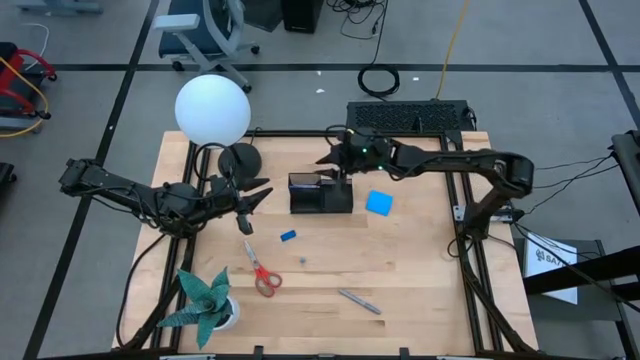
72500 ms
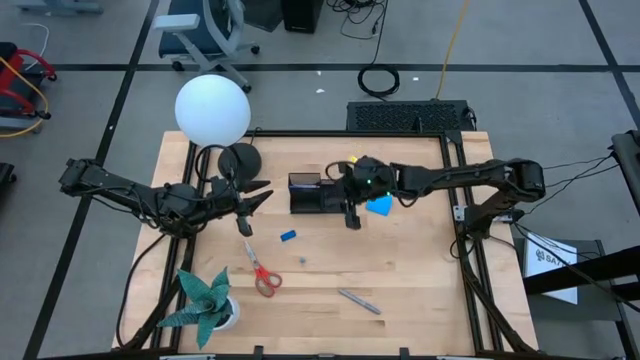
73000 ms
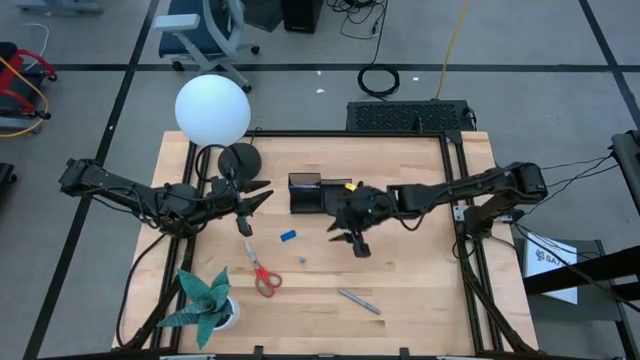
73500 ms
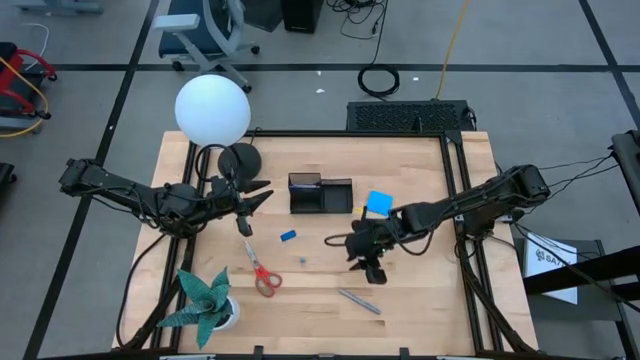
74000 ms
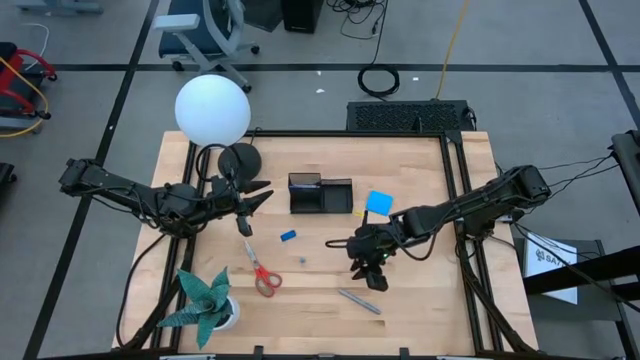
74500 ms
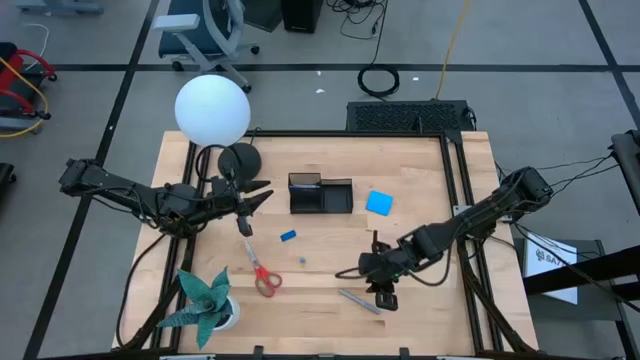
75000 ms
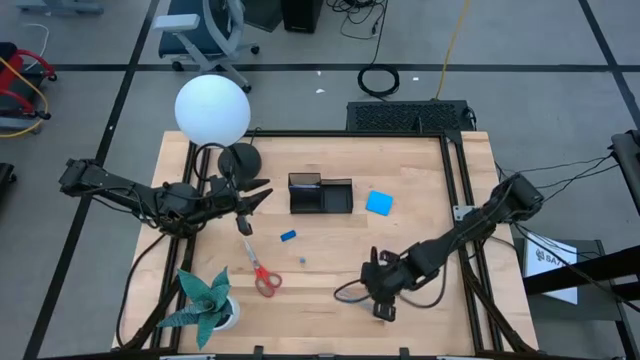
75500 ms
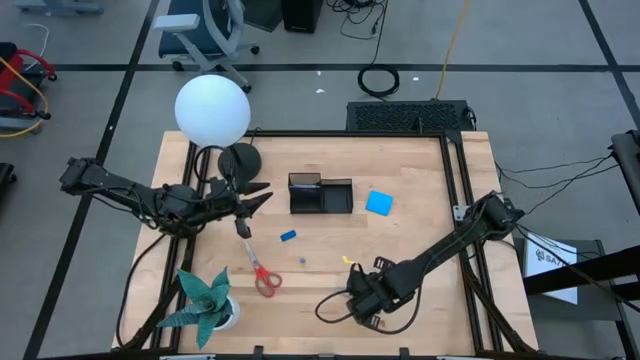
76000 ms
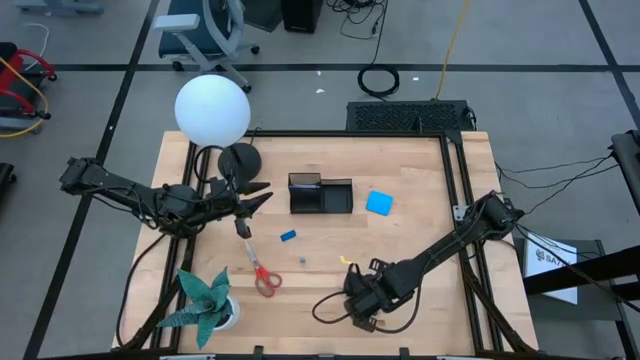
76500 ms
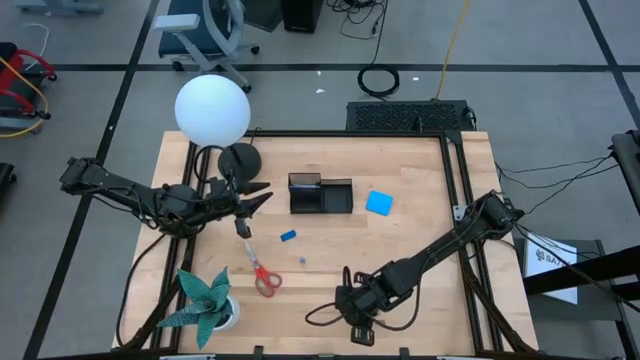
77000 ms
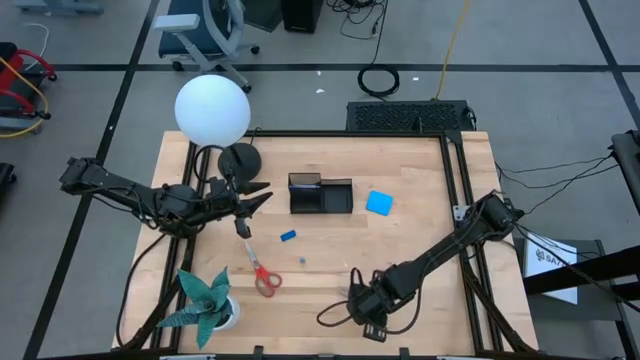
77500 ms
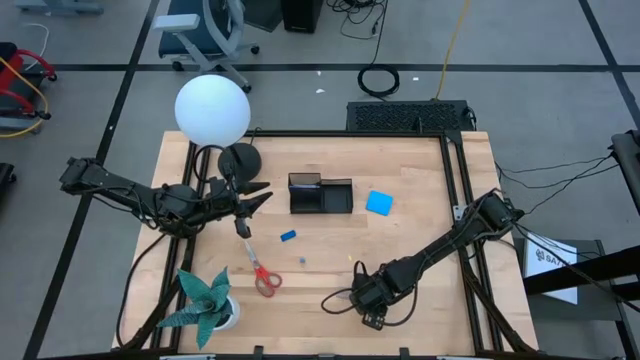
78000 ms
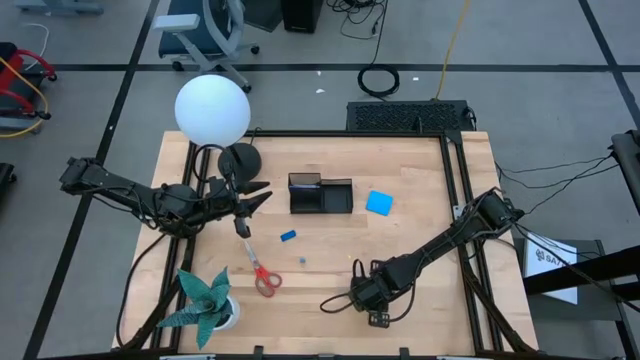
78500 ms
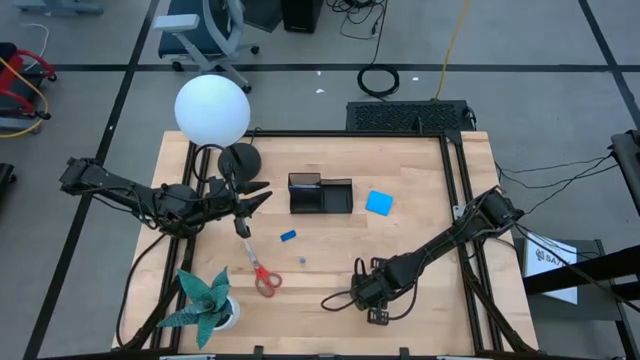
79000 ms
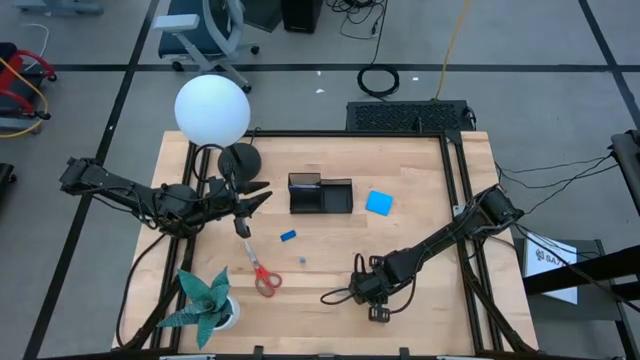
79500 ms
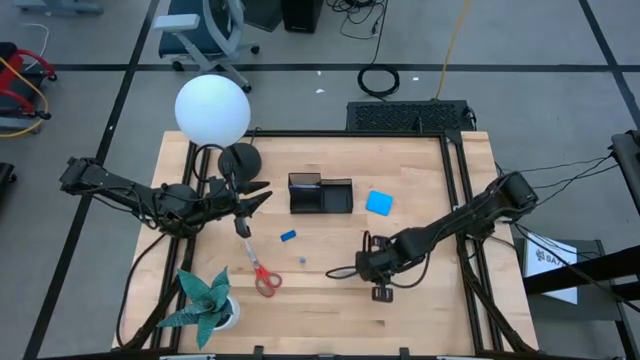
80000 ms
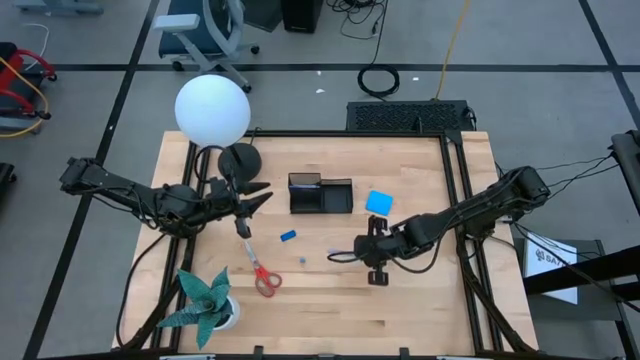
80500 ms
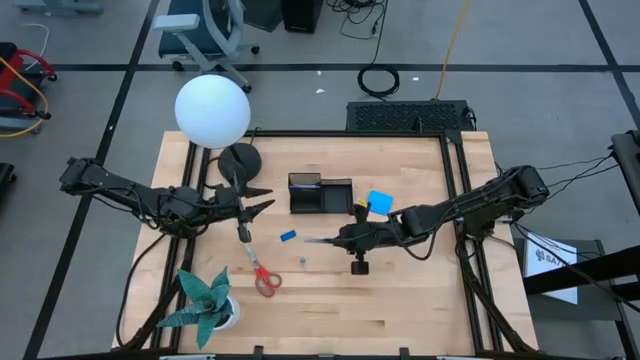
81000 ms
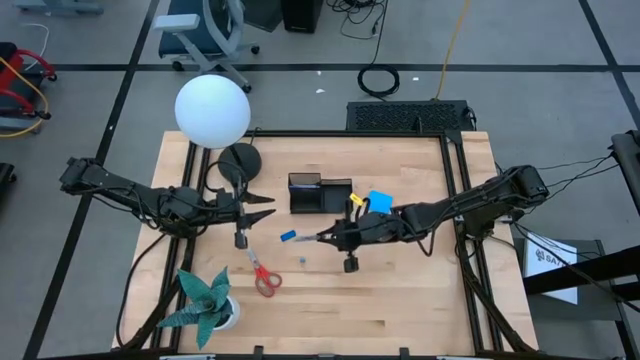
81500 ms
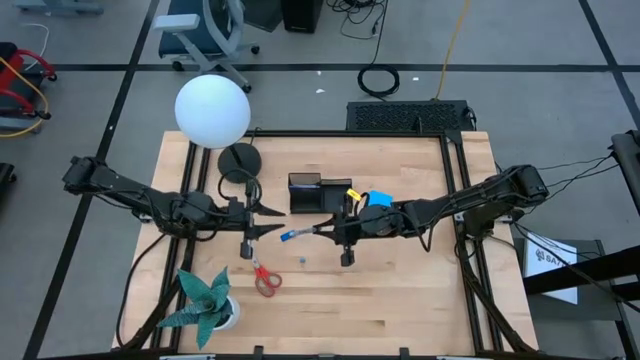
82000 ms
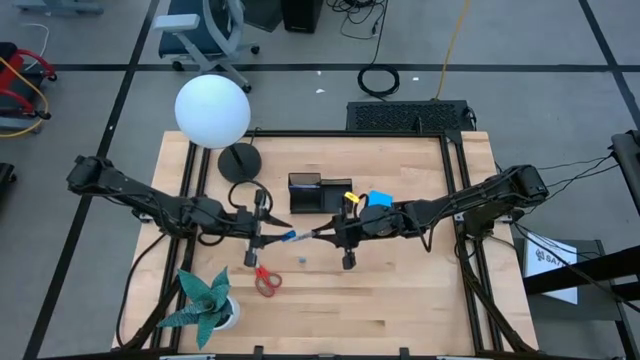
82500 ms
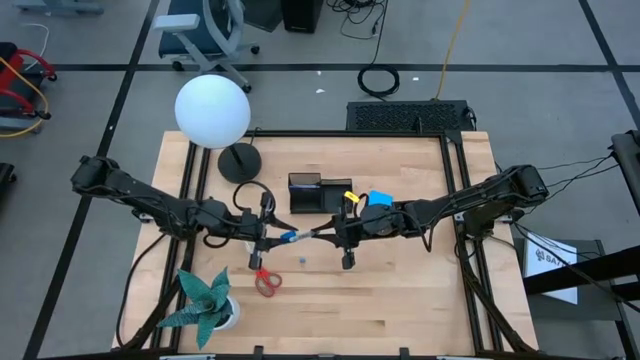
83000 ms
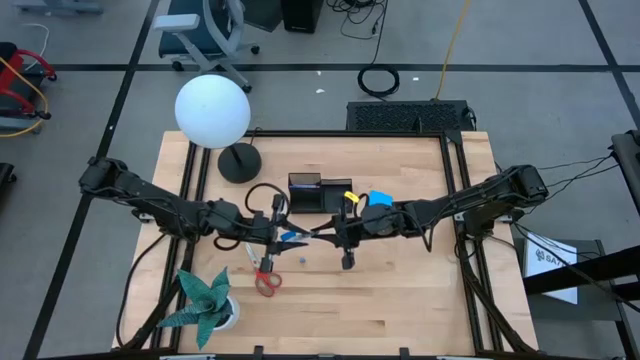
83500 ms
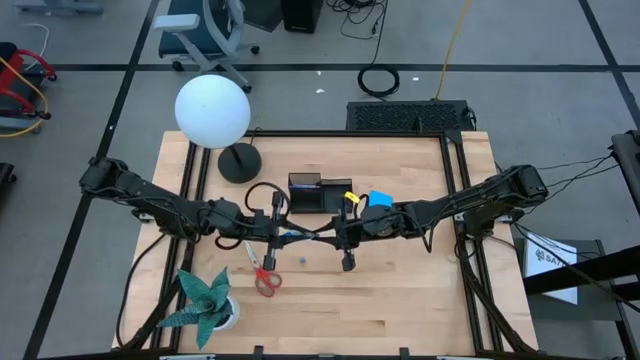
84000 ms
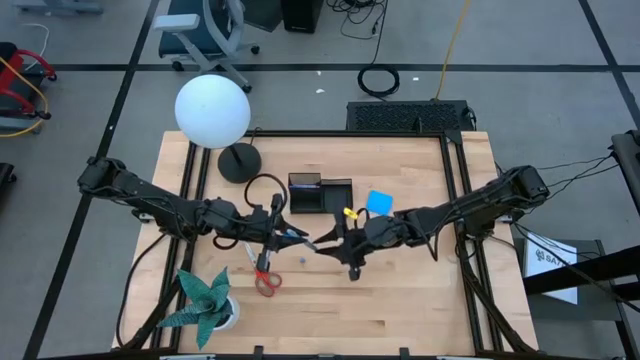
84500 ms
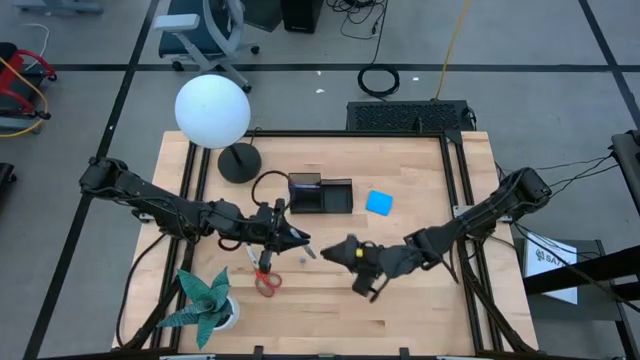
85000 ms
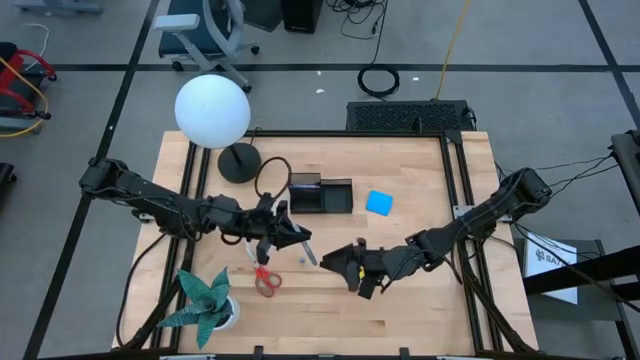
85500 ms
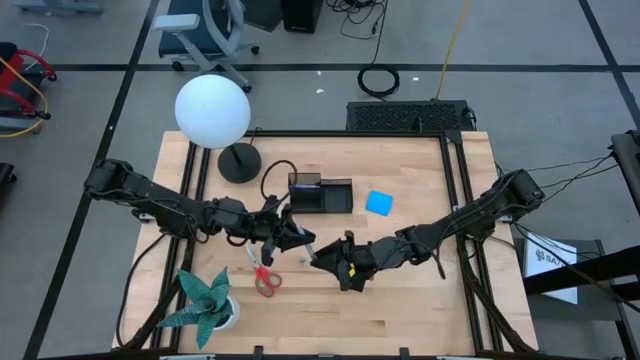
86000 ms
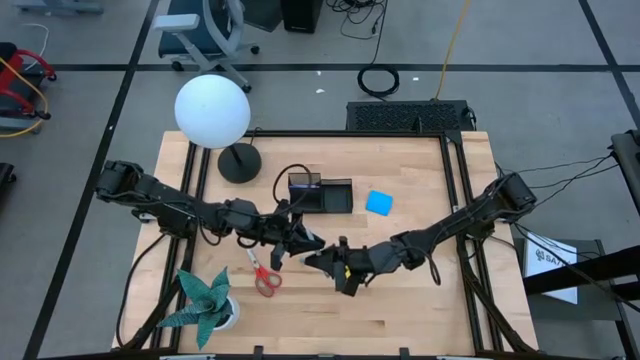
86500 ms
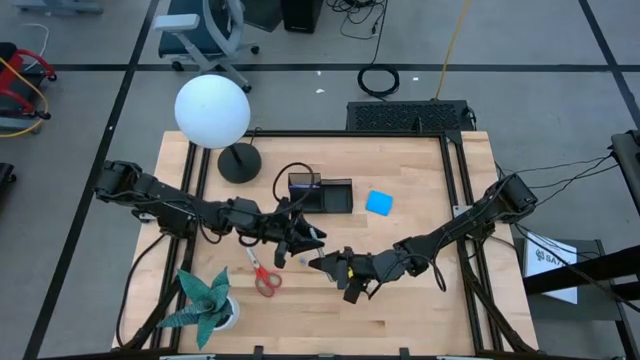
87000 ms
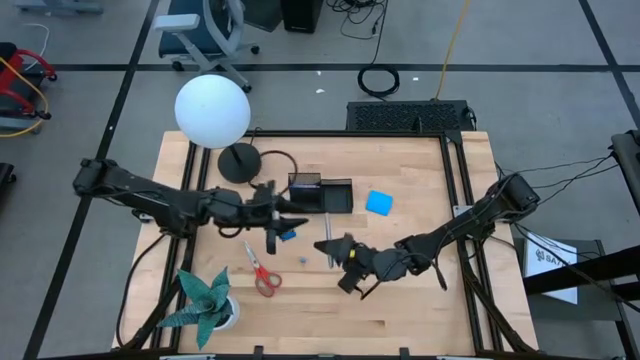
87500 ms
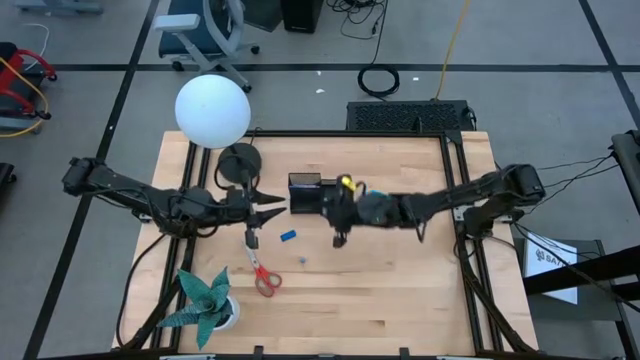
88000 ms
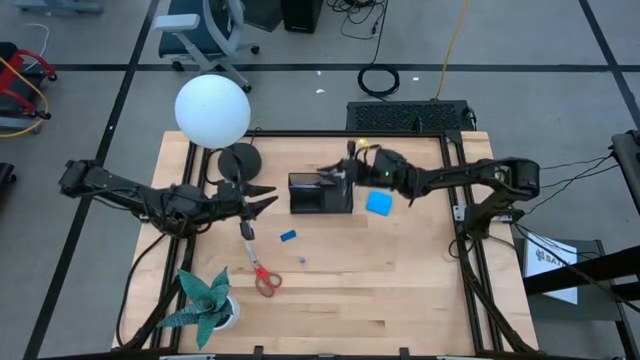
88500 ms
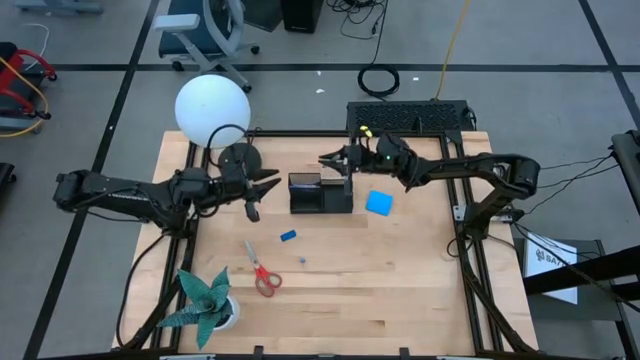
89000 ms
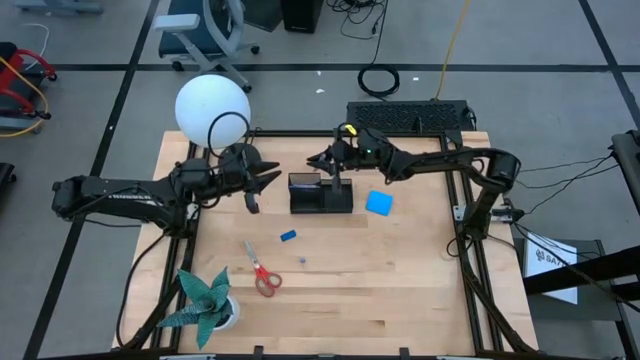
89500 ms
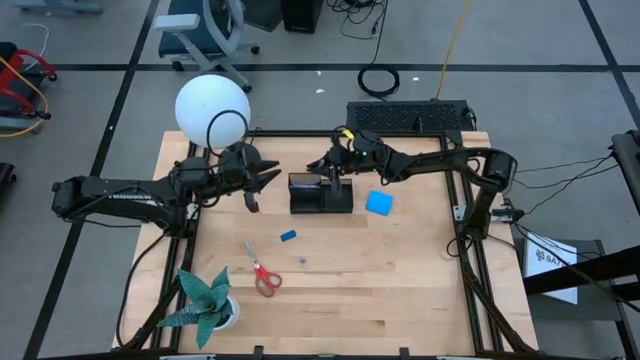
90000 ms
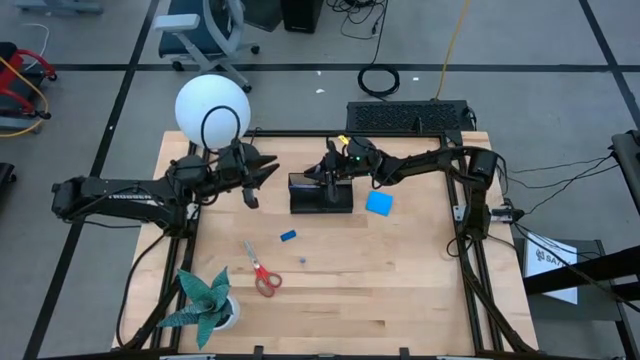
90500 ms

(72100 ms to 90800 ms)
Task: Pick and place office supplies into organizer
Put the gray highlighter into the black desk organizer

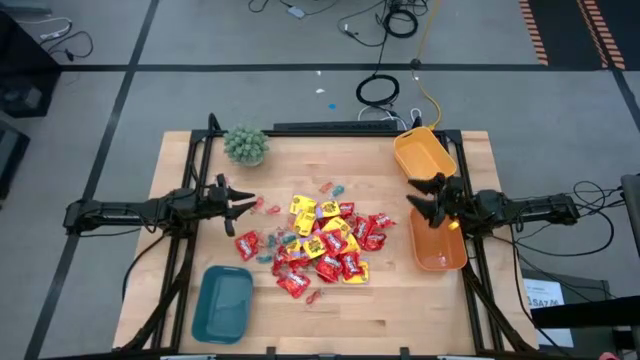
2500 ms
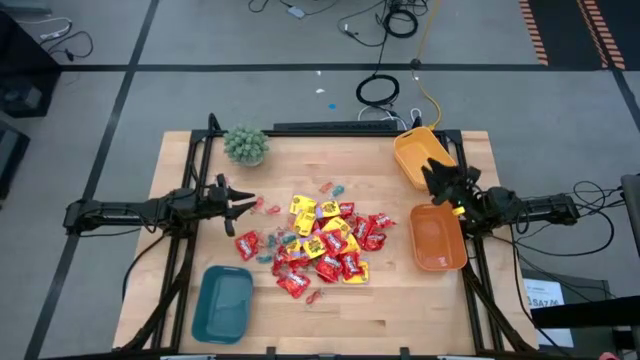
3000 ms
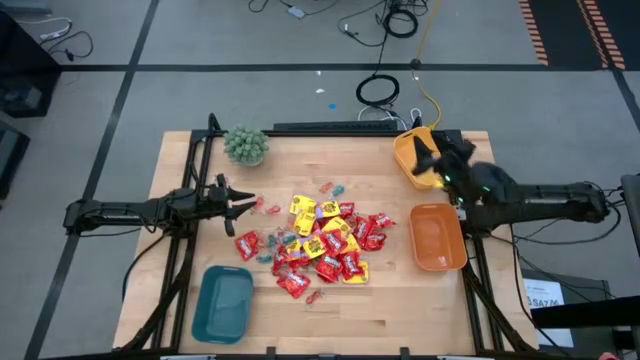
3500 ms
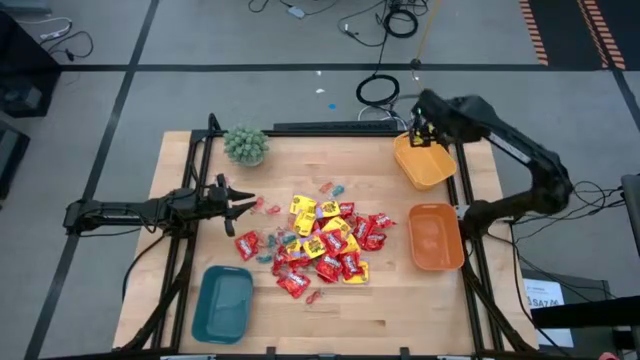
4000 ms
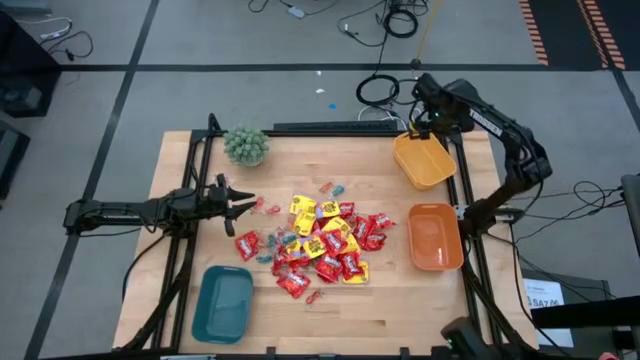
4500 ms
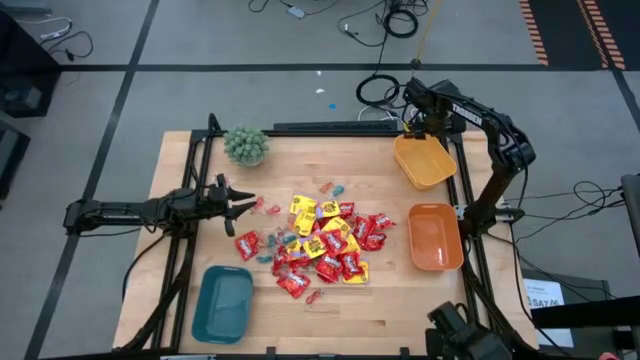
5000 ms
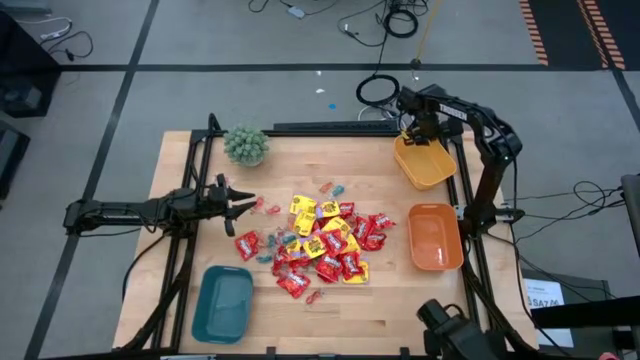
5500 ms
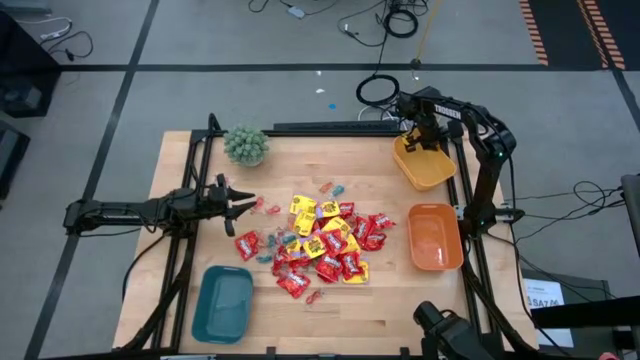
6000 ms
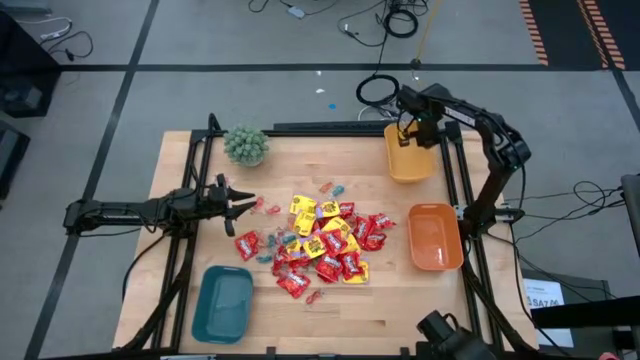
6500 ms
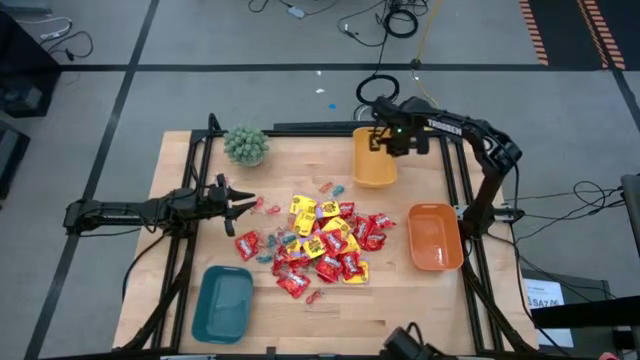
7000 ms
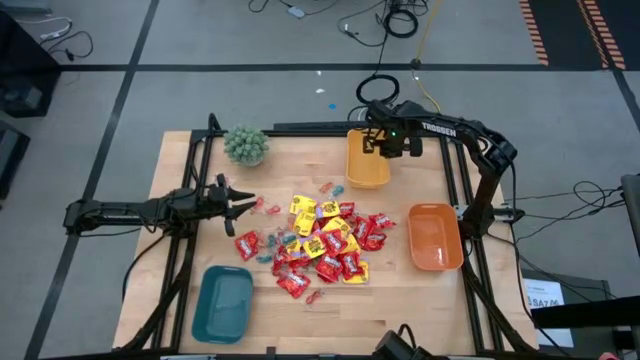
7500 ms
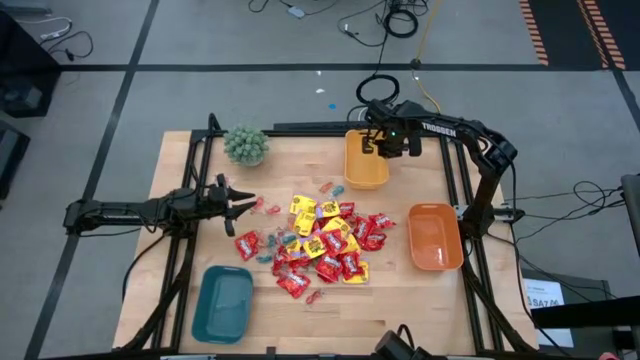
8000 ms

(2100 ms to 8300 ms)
Task: Sort candy
Move the yellow bin to the center
